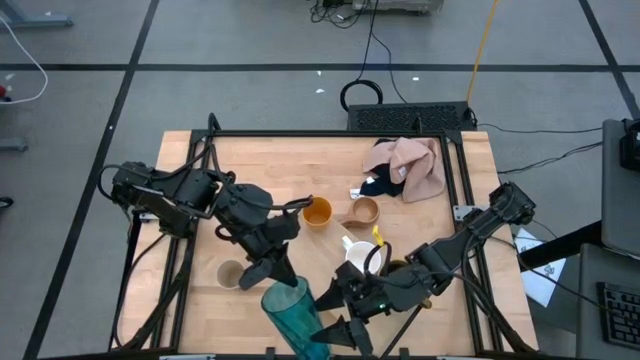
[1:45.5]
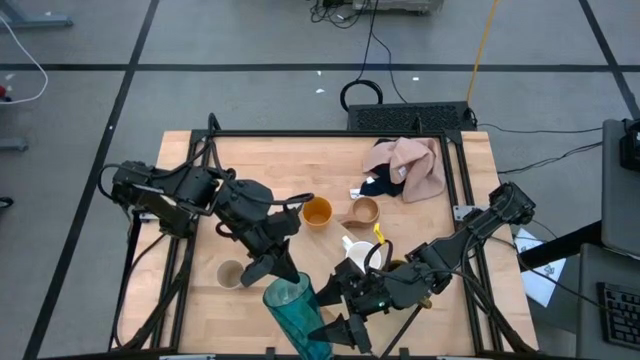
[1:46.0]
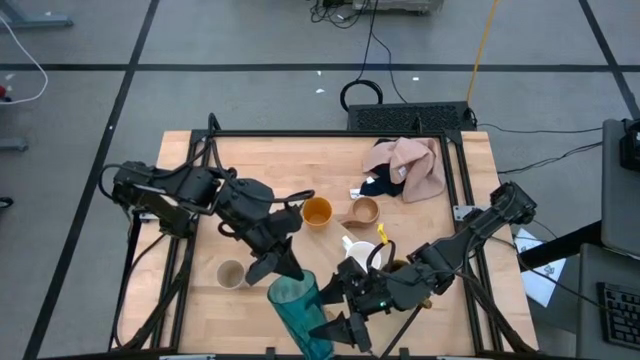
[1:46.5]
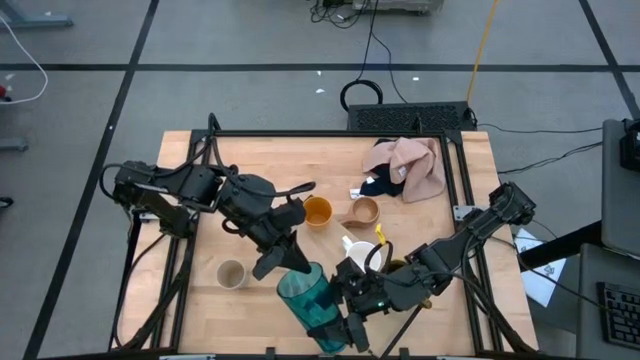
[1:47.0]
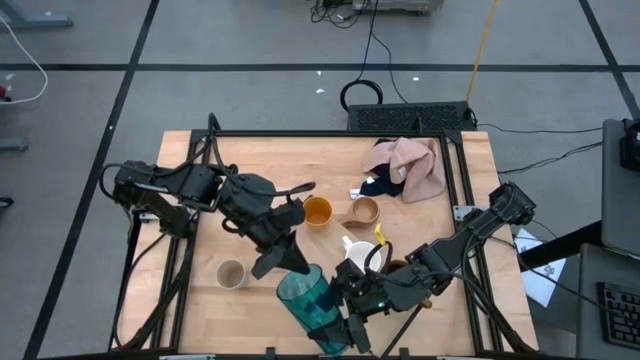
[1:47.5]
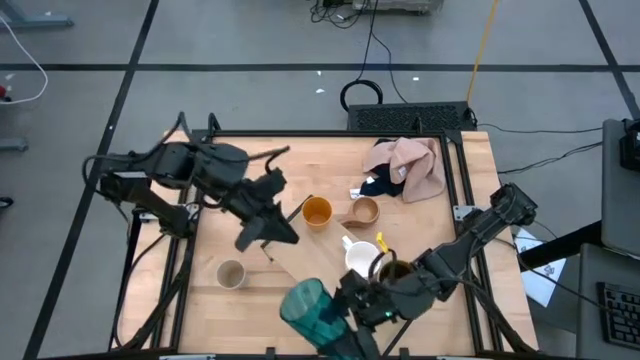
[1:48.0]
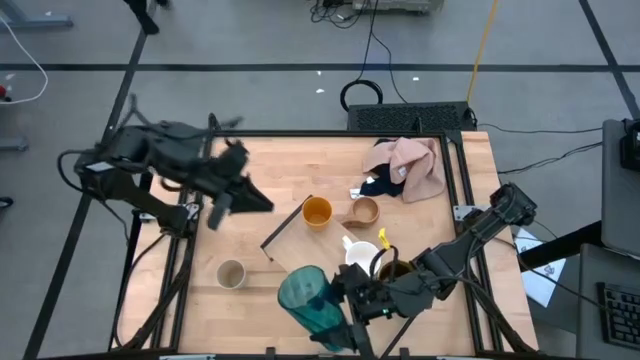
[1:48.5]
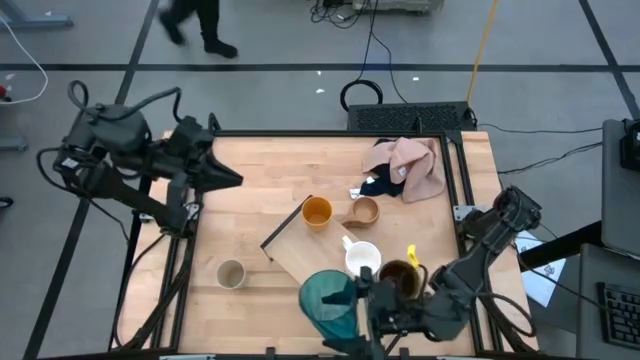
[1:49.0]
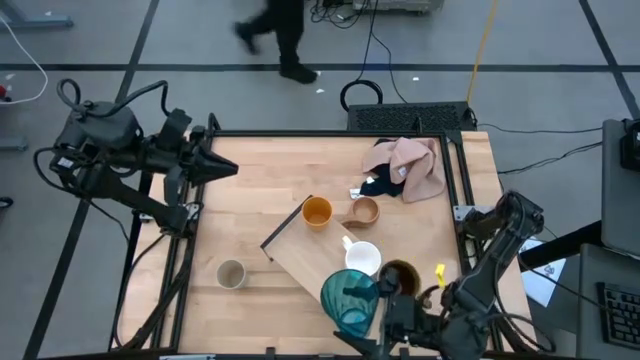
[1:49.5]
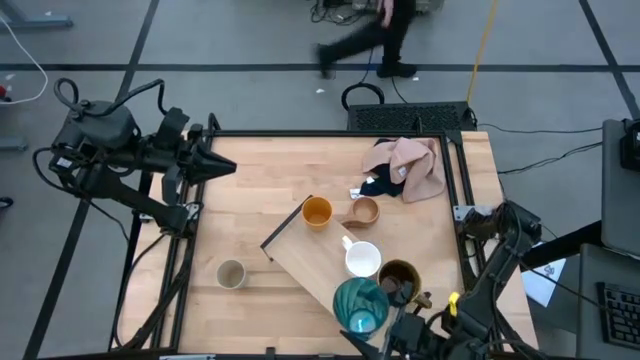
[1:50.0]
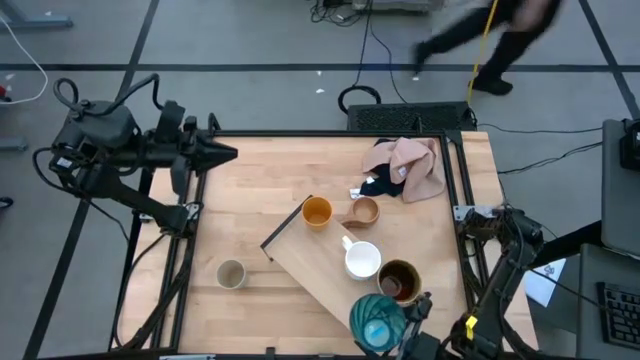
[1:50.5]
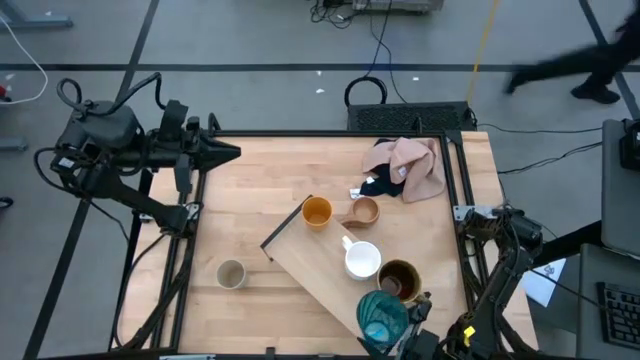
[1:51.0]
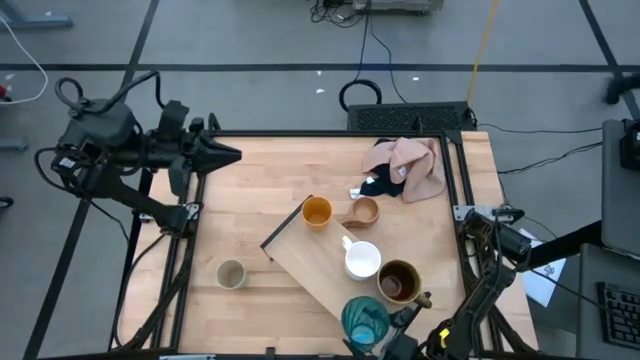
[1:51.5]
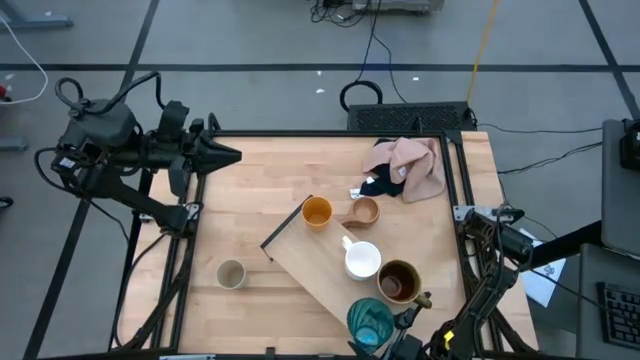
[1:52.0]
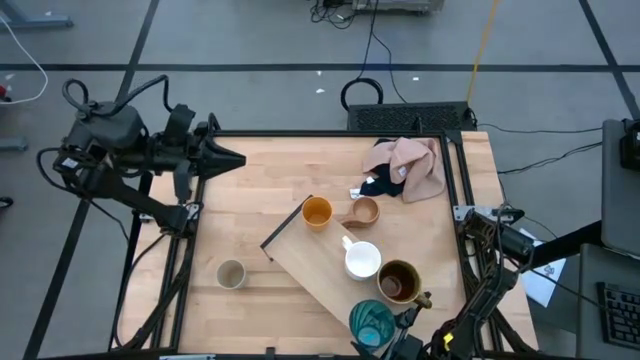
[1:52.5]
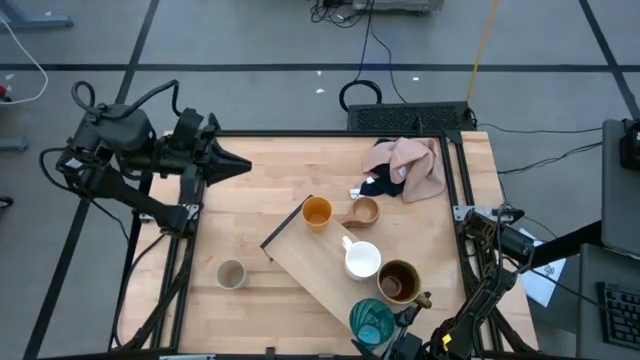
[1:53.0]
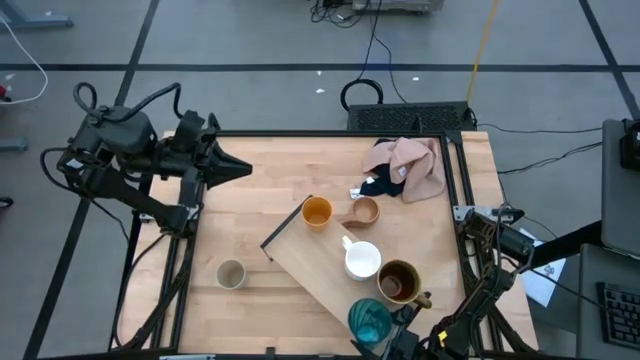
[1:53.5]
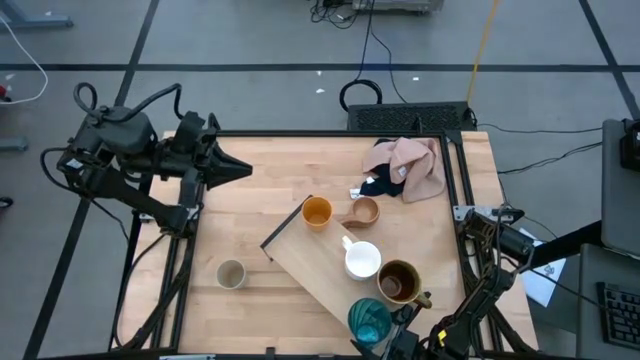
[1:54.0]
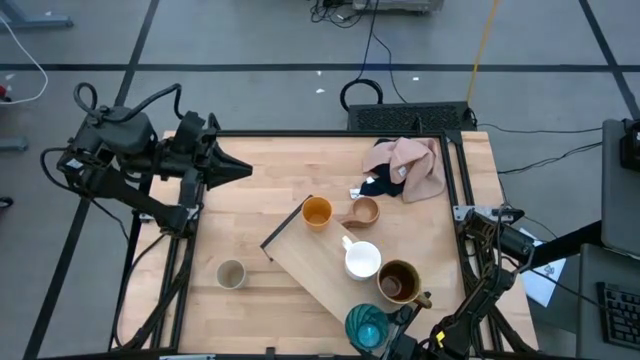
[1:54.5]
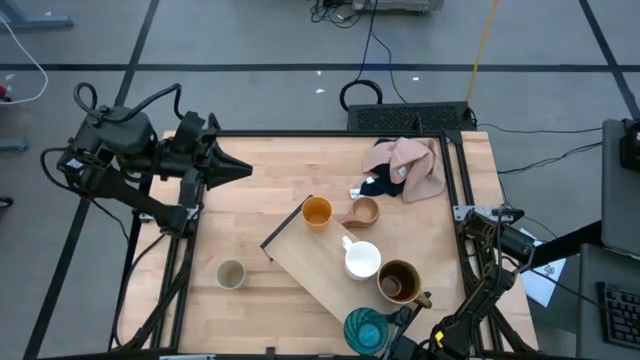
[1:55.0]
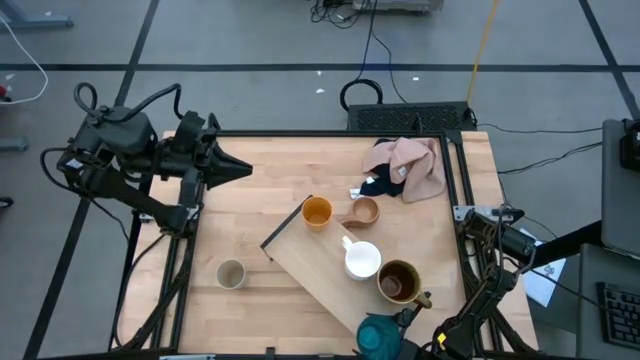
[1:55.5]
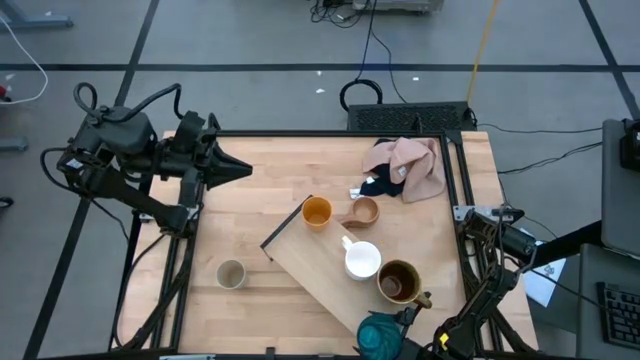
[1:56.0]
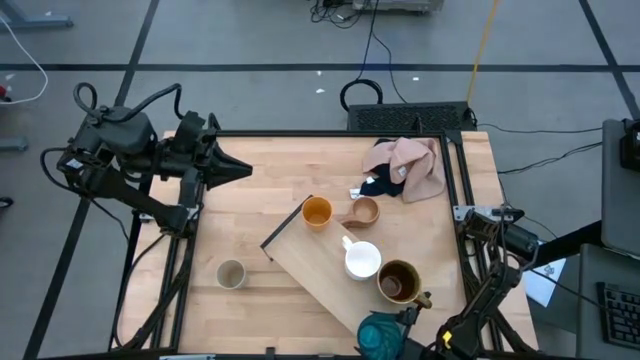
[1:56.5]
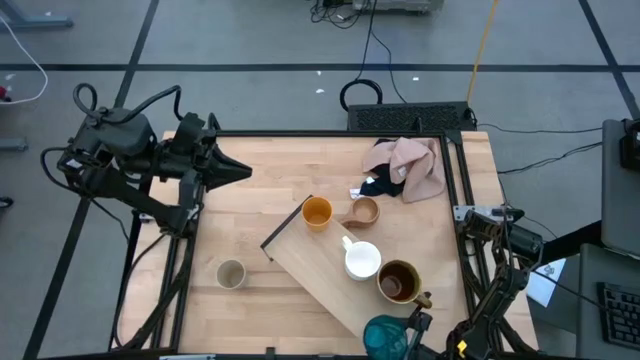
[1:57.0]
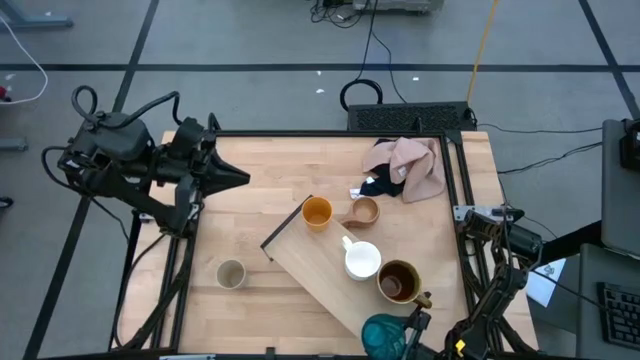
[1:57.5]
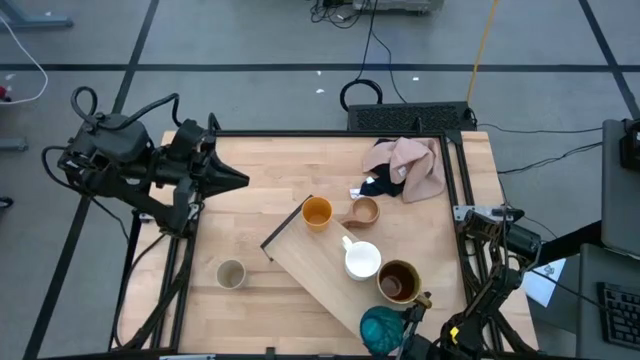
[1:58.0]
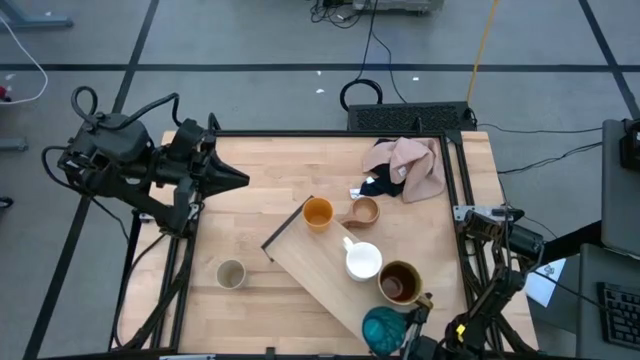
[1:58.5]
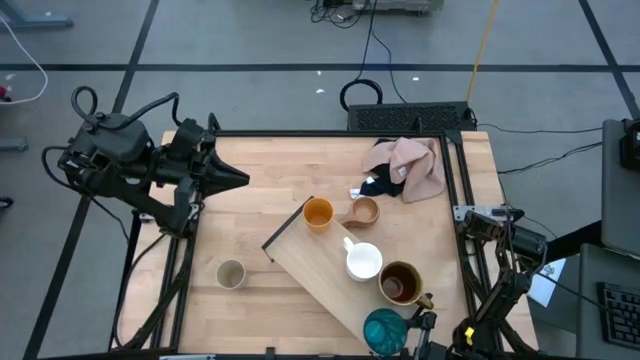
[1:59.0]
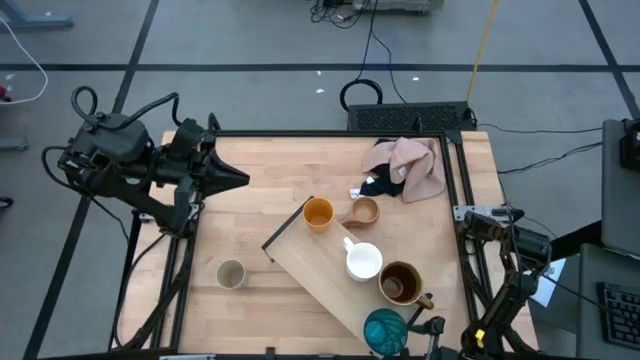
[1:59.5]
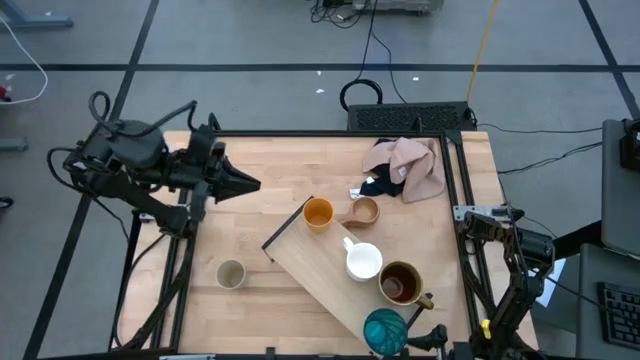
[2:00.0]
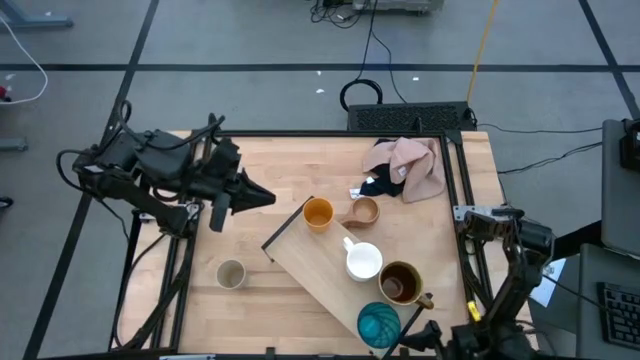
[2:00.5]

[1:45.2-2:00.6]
Task: Stack small to large cups/mugs on shelf
Put the blue cup on the shelf

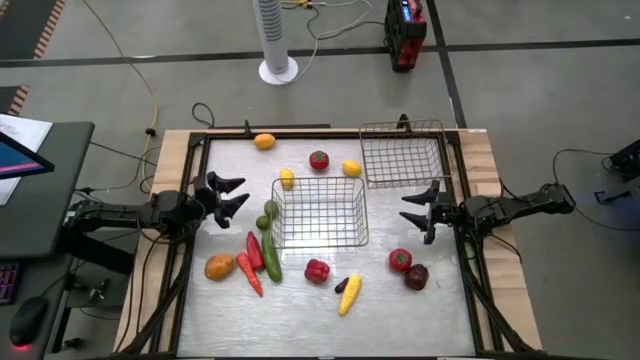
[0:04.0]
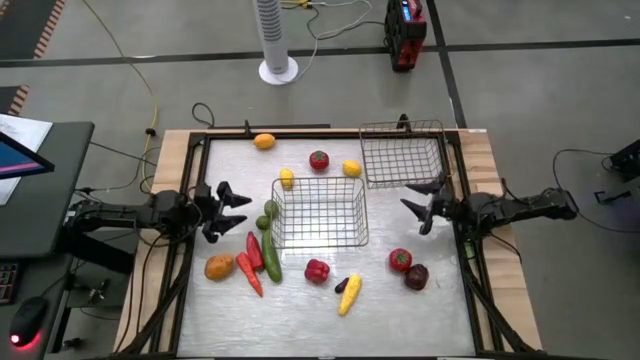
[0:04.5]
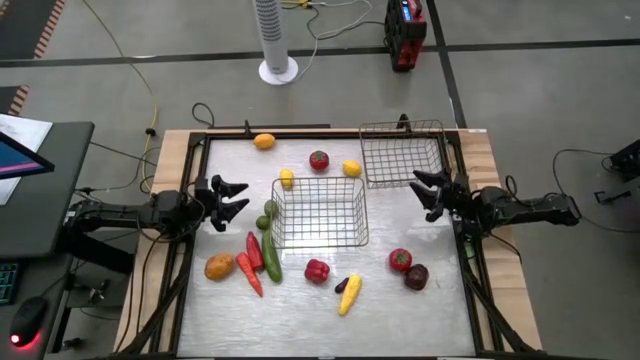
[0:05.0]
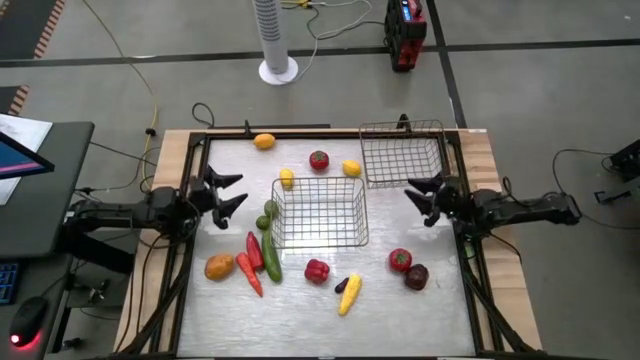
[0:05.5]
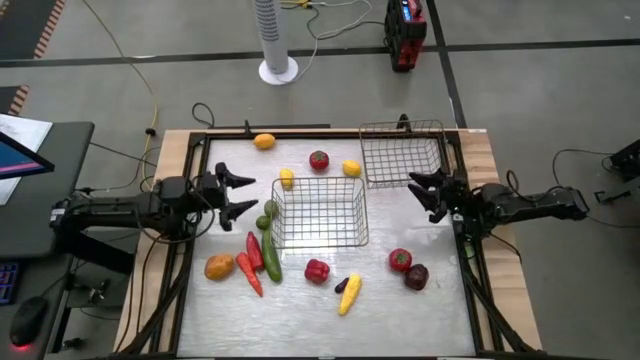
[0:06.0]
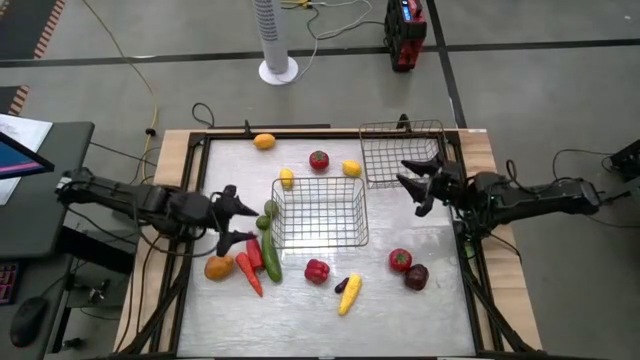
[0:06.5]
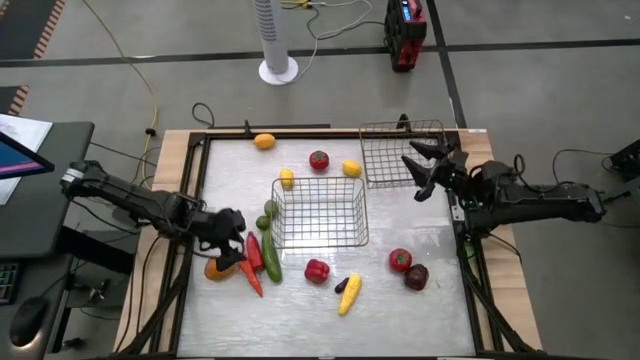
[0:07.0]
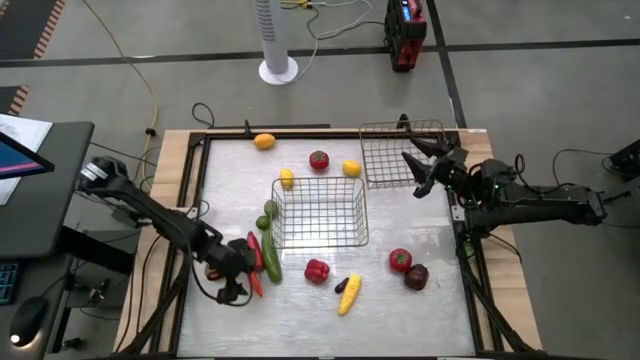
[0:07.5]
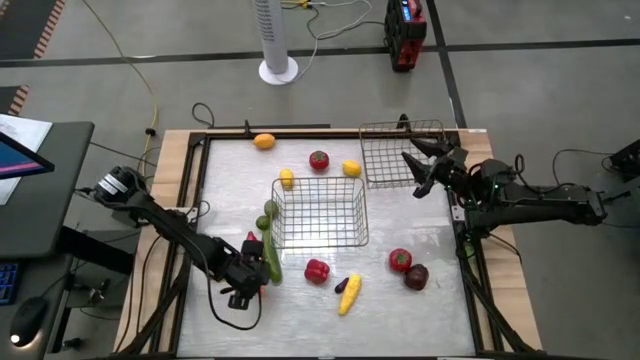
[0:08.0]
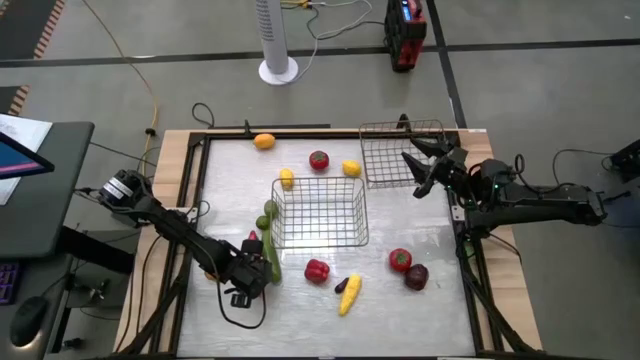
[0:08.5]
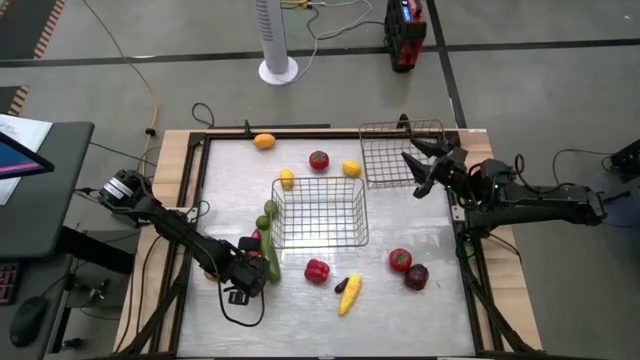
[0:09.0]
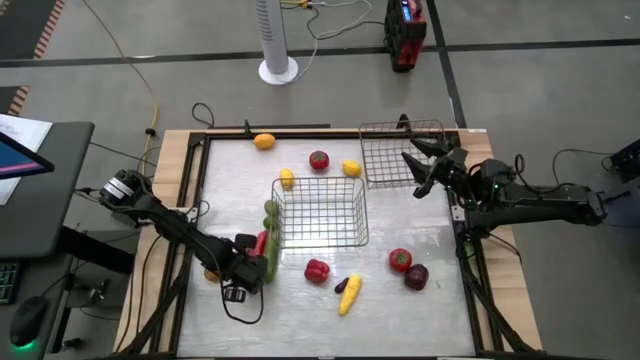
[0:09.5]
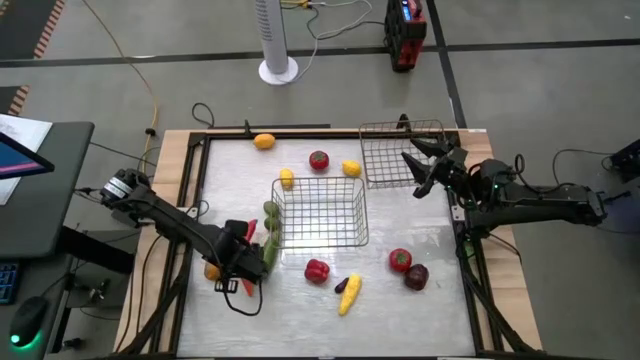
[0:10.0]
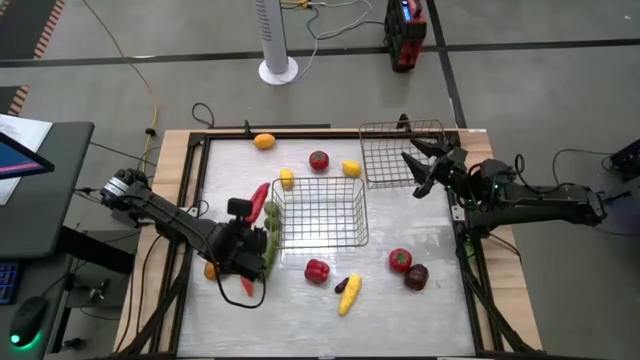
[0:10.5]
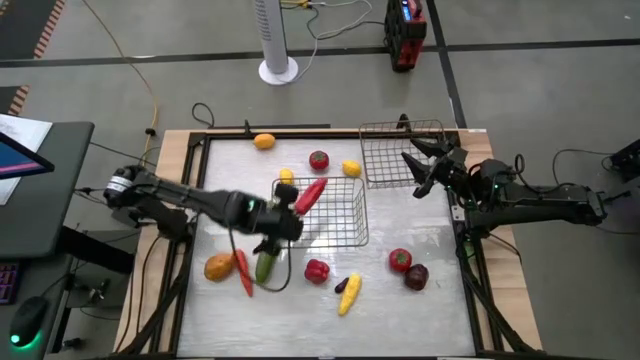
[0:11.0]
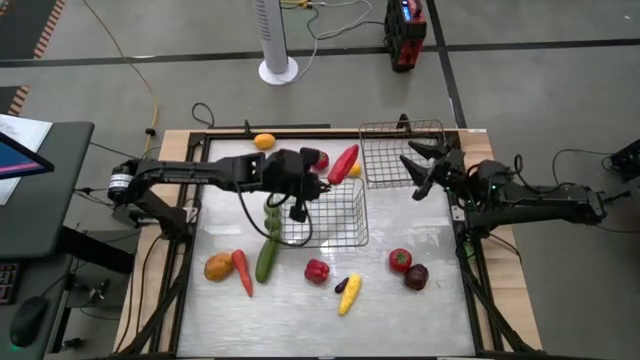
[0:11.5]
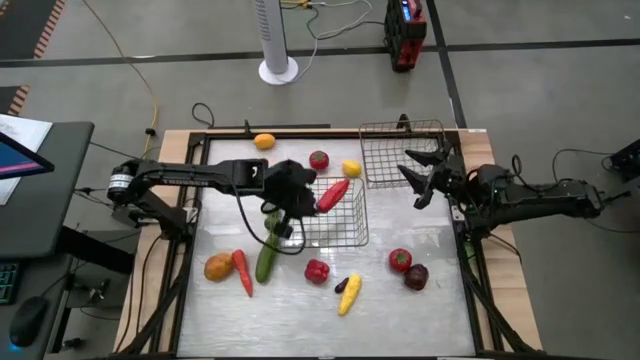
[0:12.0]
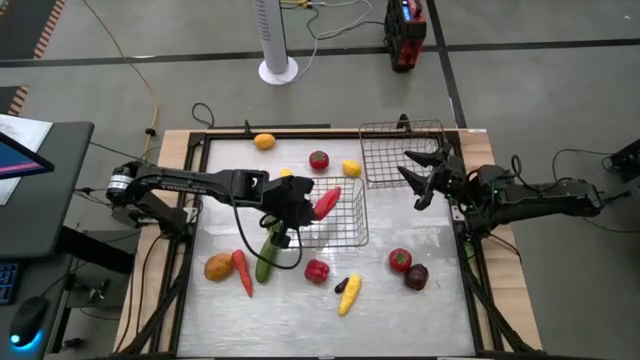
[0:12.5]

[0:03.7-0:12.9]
Task: Sort produce into baskets
Put the red chili pepper into the left wire basket
